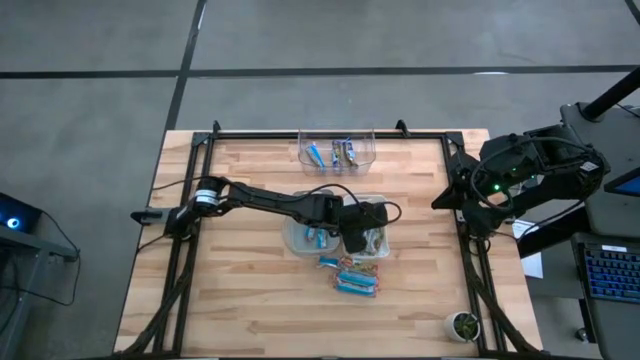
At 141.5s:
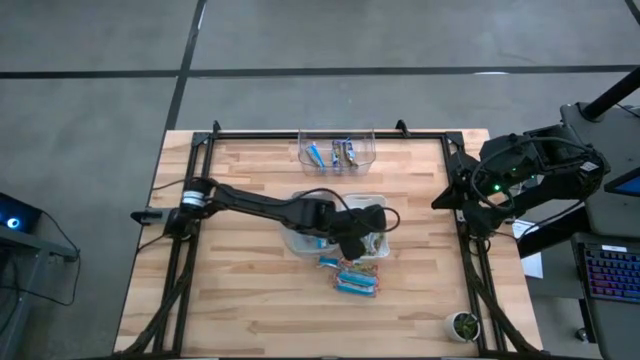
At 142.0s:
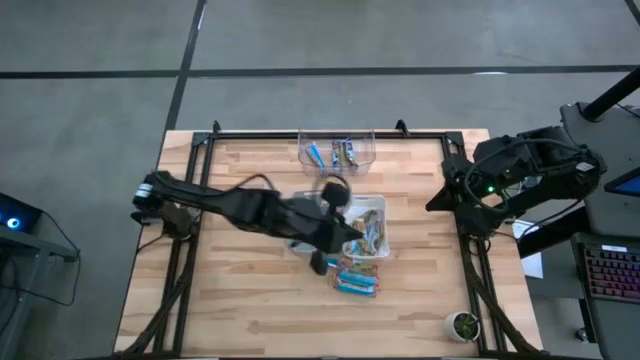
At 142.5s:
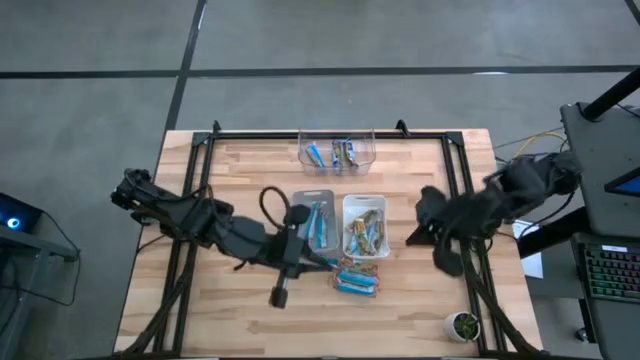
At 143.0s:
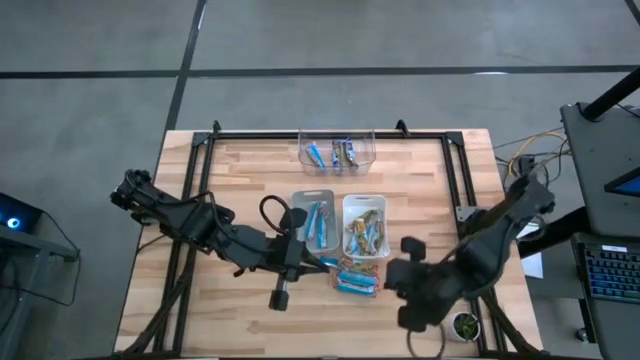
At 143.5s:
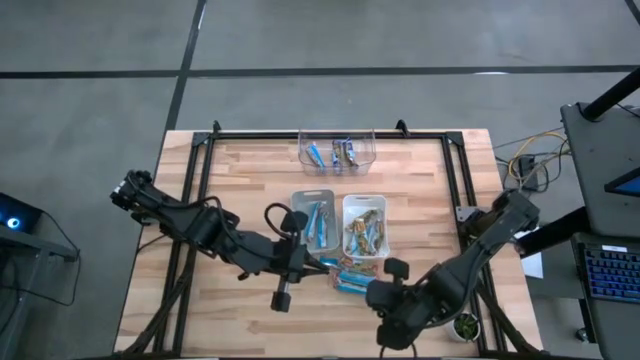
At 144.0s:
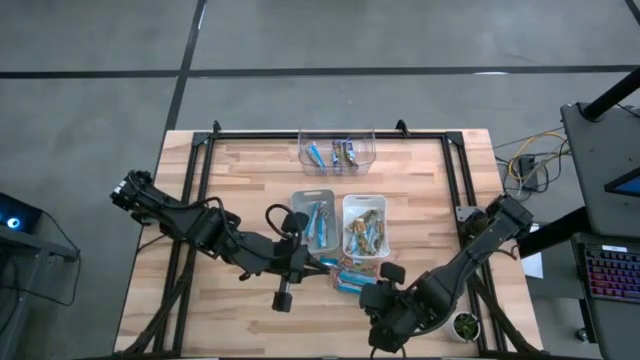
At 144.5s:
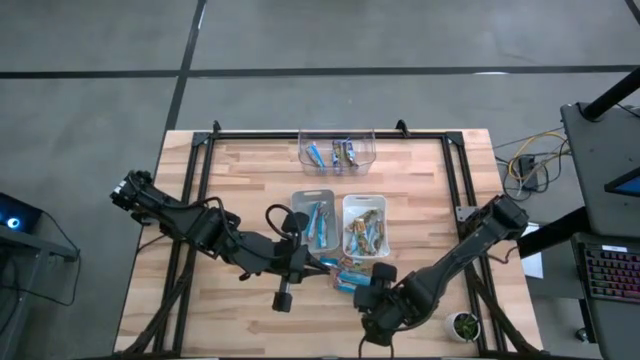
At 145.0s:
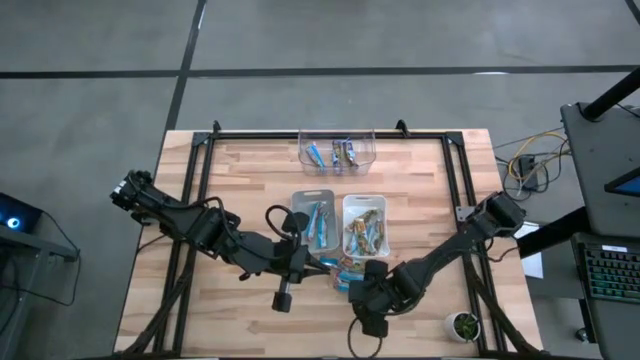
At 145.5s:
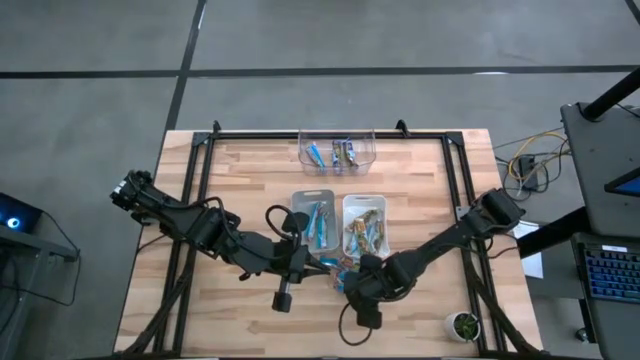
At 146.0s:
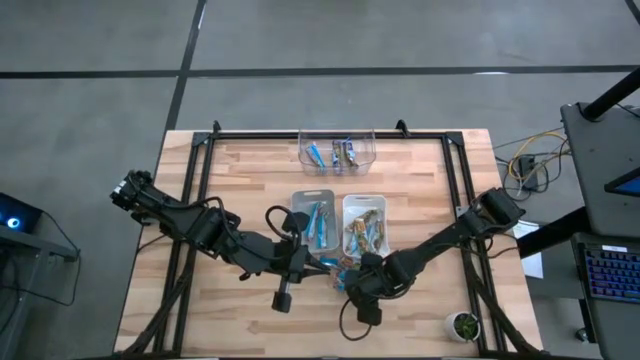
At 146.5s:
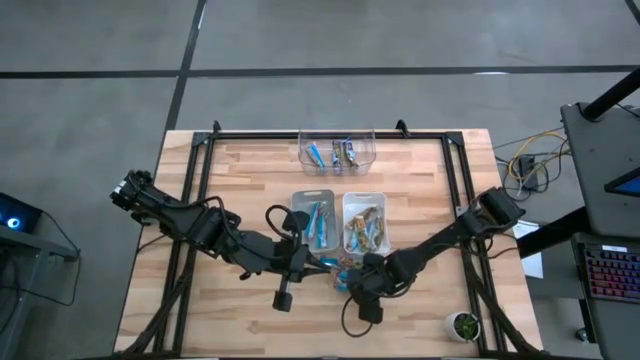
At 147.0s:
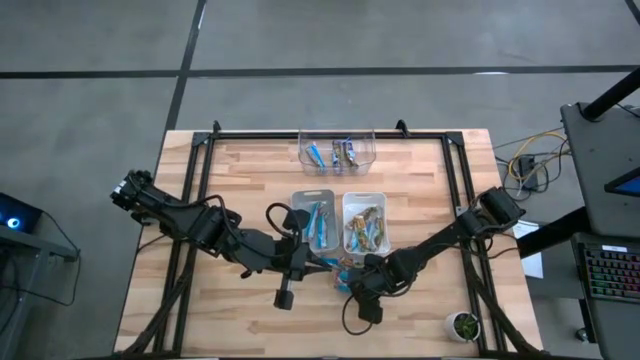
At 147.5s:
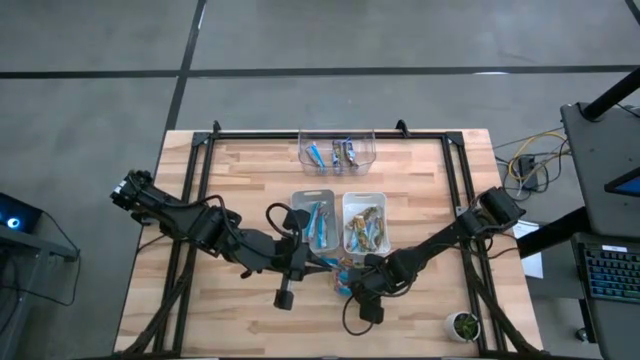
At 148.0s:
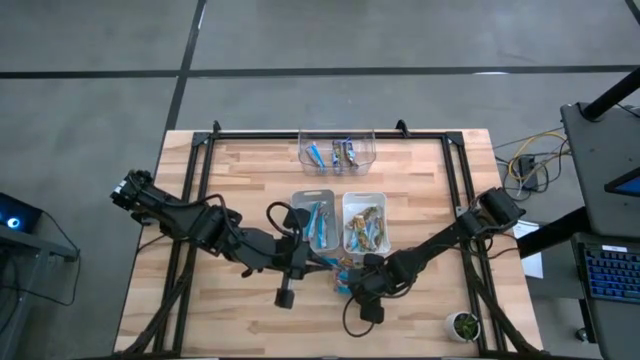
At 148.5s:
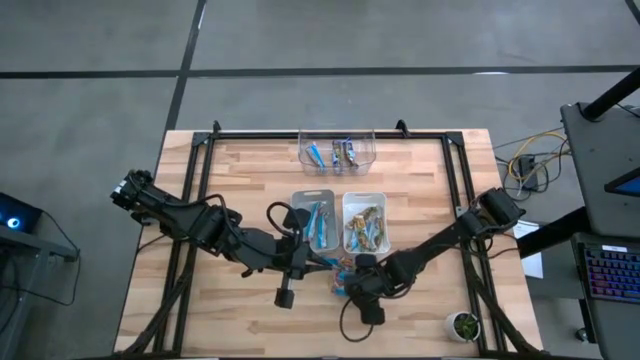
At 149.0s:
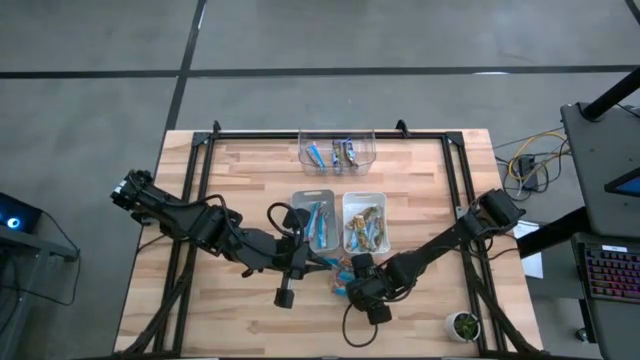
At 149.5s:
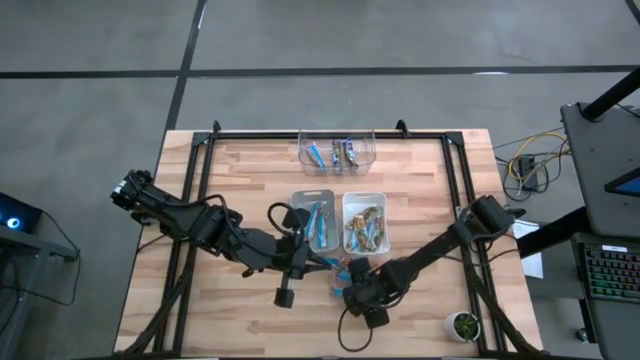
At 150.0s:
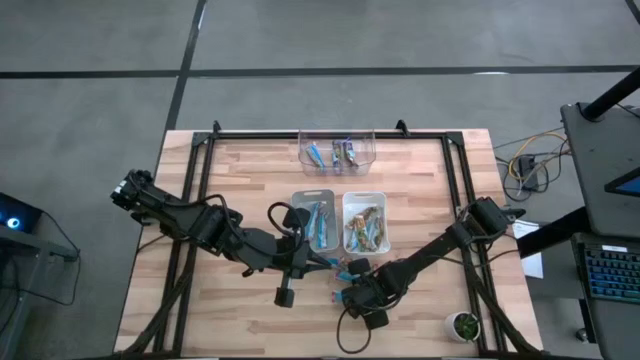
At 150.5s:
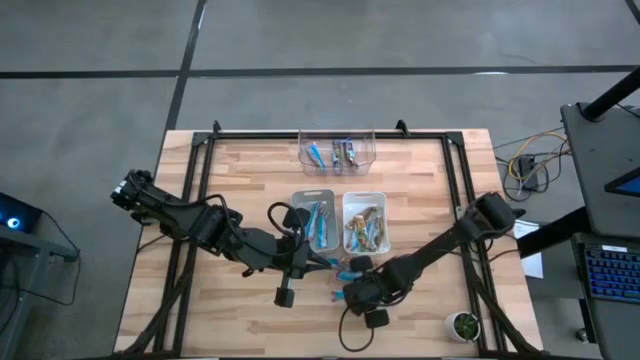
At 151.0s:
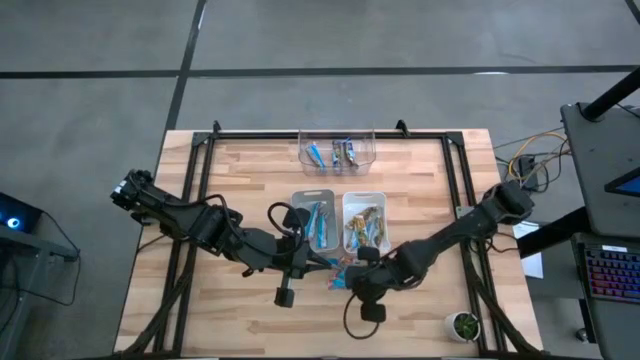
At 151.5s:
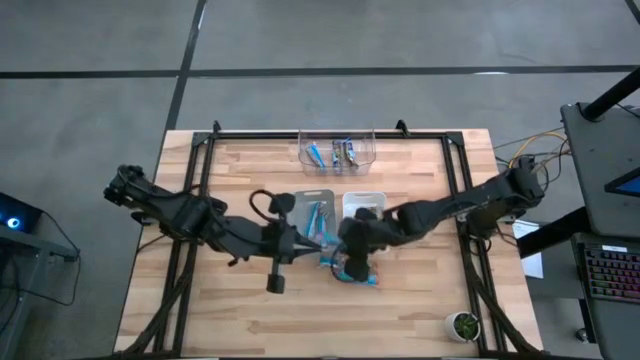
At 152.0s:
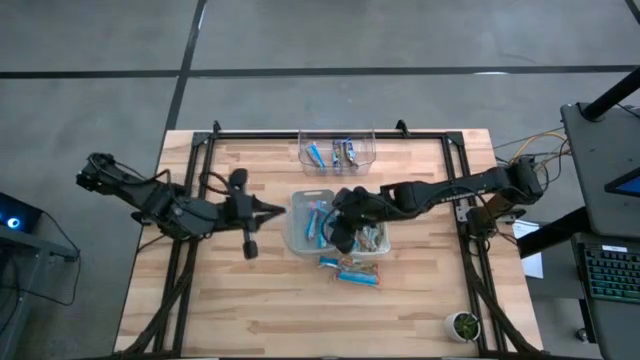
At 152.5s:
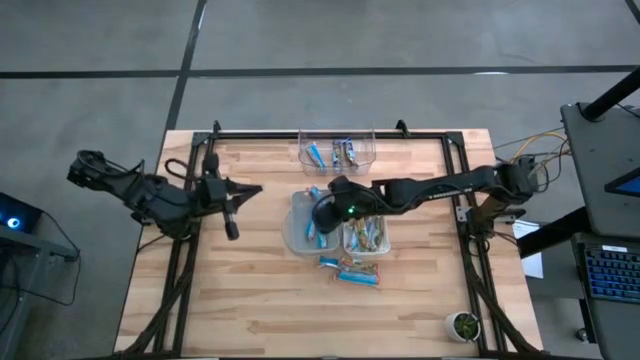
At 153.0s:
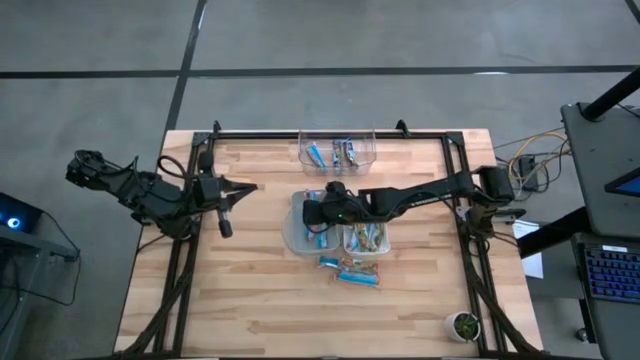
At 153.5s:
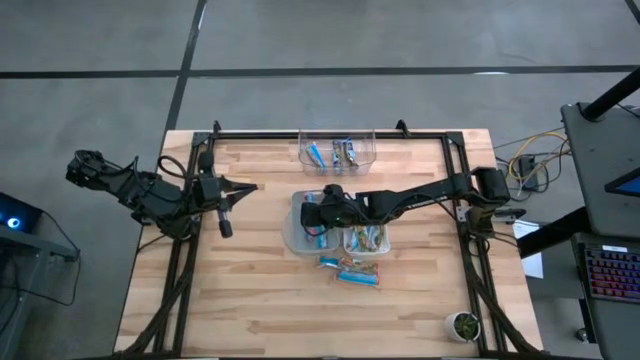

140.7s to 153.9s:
Task: Pick and place Granola Bars by type
Put the red granola bar into the gray bin

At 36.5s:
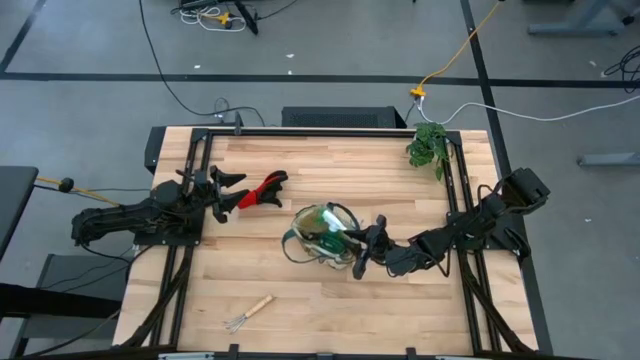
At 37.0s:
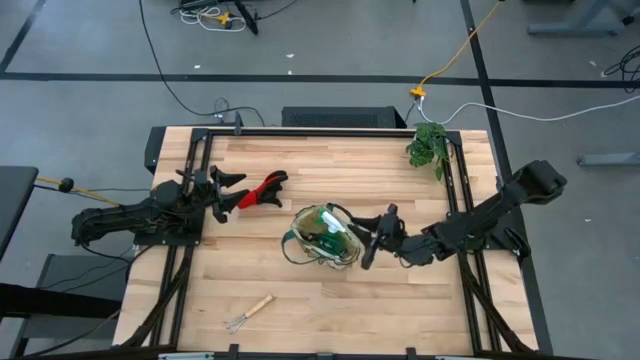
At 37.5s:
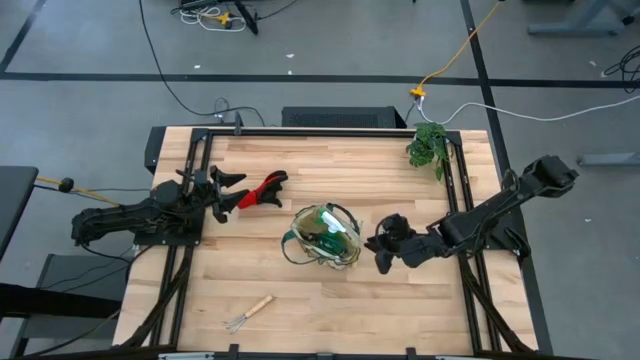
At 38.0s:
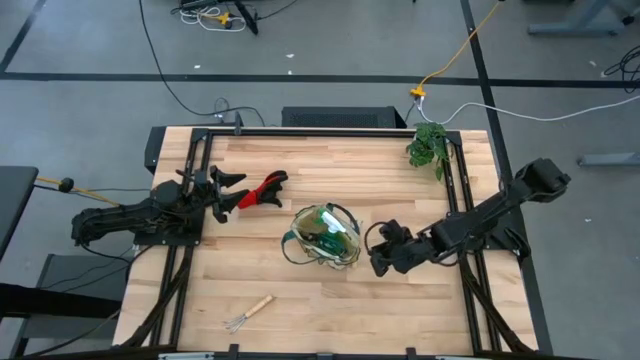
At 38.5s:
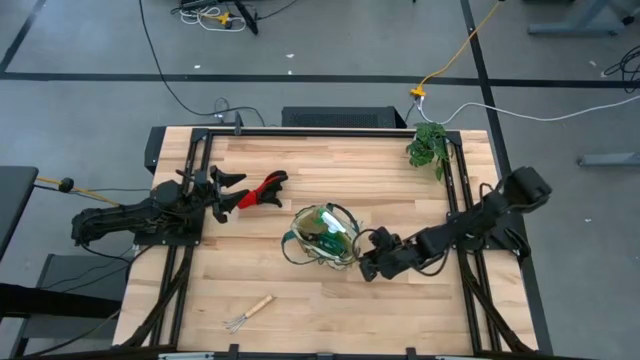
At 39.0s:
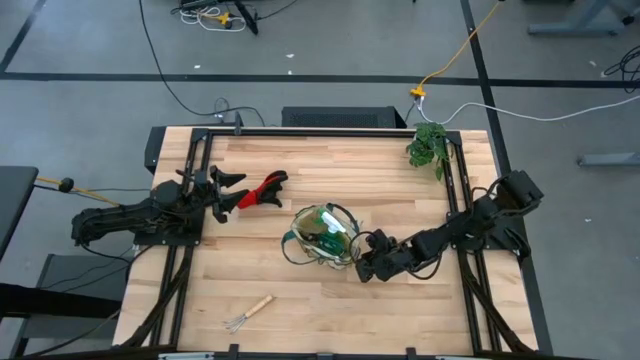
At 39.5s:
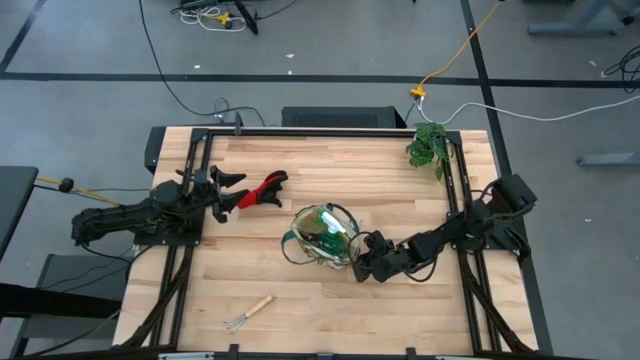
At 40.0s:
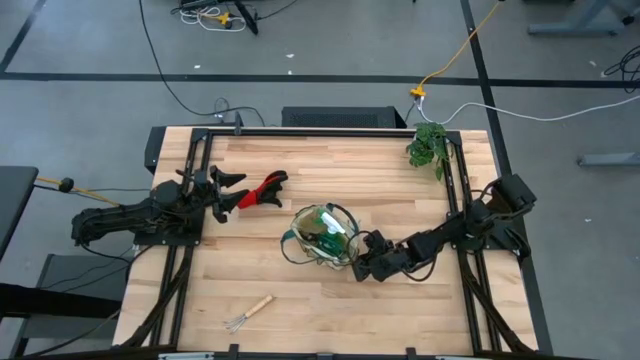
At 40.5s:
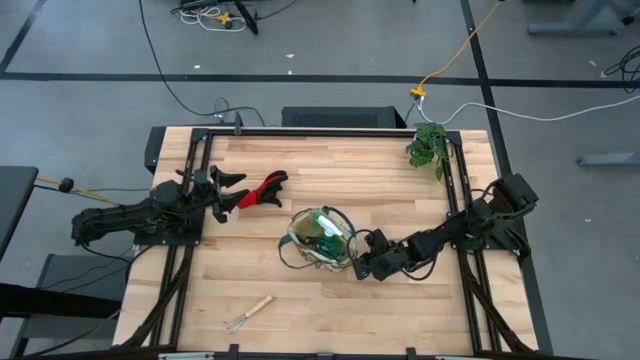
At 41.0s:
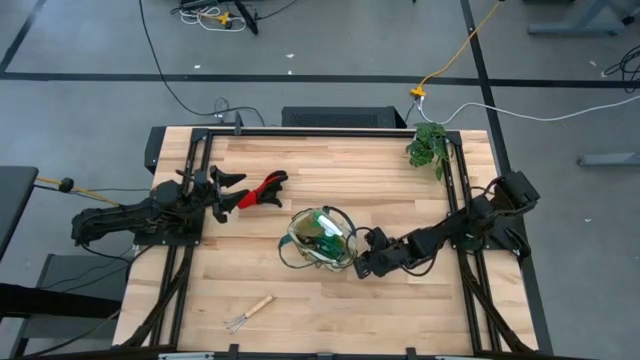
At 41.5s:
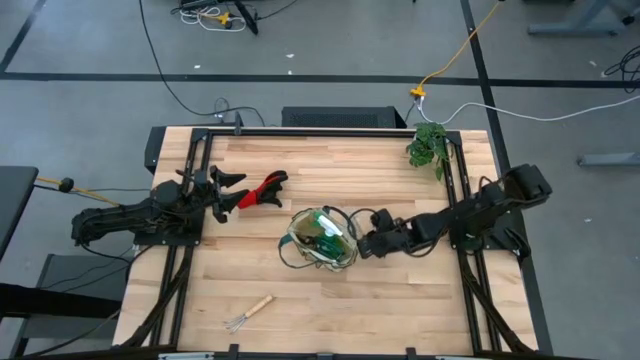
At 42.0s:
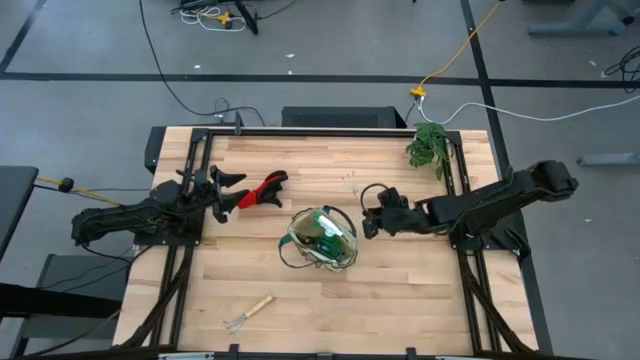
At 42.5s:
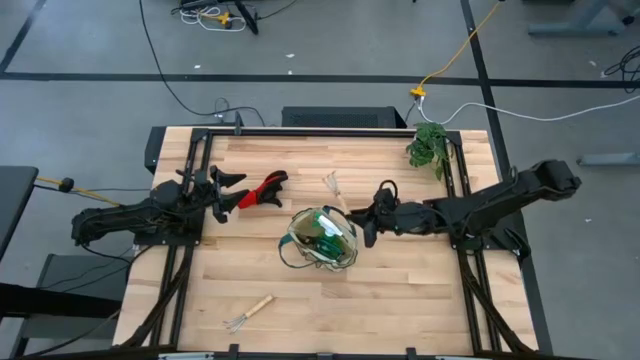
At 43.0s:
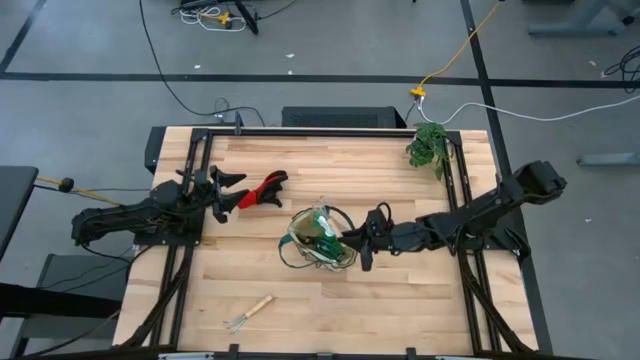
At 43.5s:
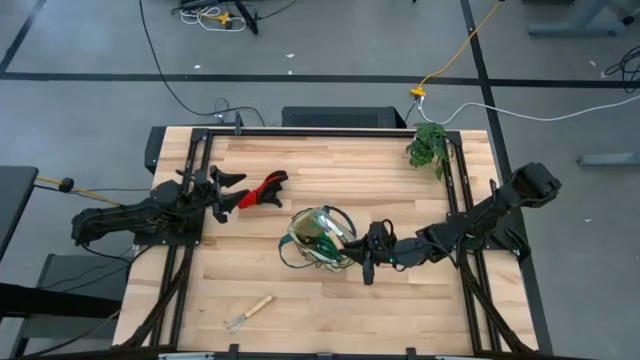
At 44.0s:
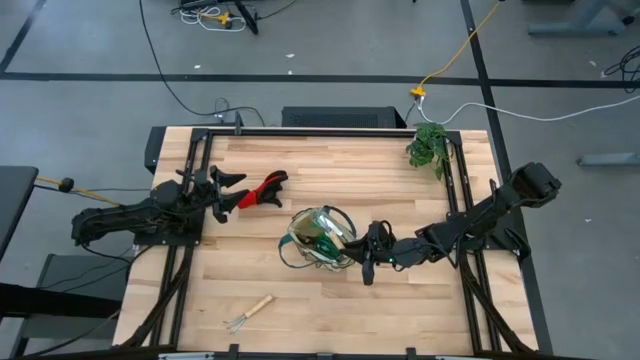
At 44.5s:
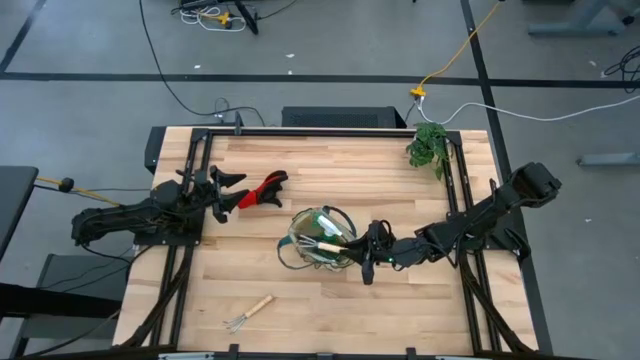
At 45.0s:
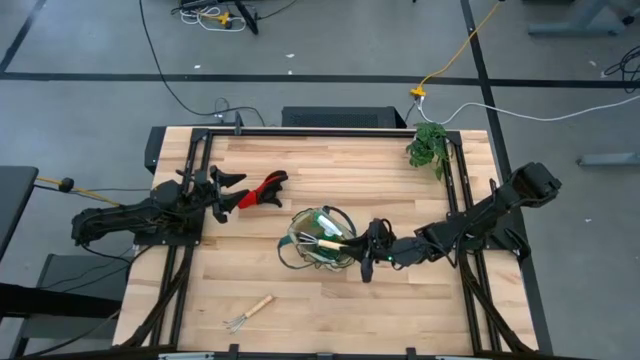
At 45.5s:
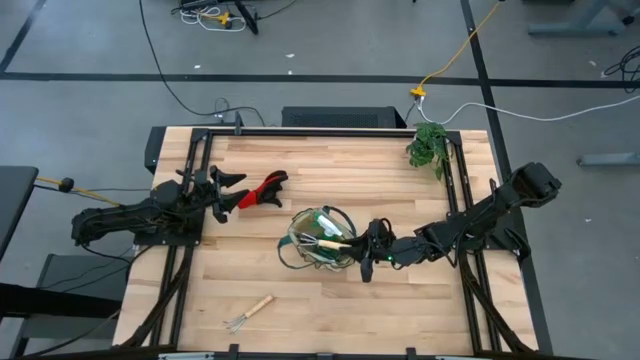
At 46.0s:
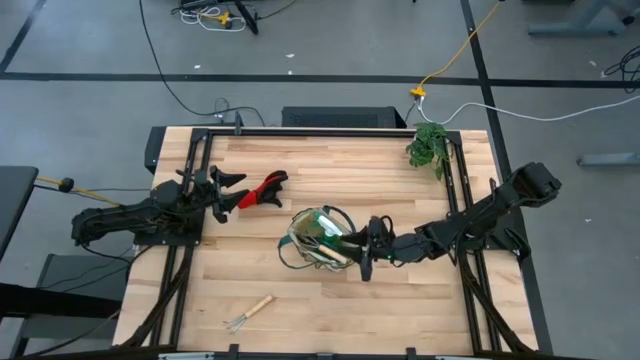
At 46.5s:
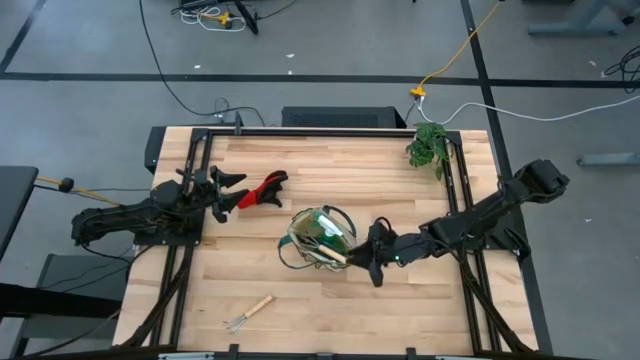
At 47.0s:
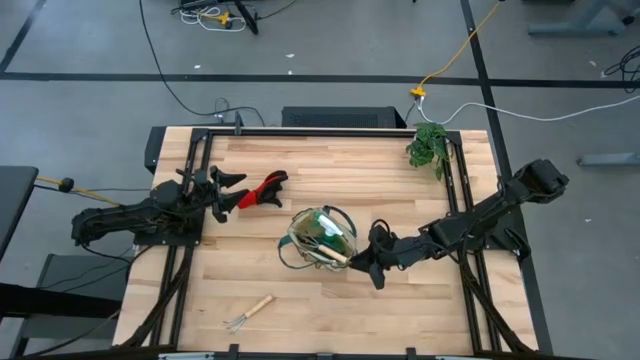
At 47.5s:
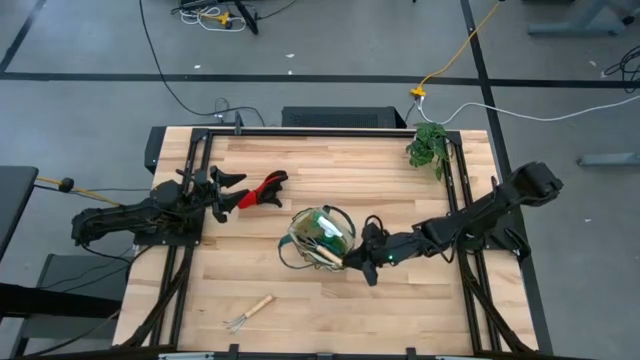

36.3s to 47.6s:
Task: Pick & Place Garden tools in Gardening bag
Put the light brown rake into the white bag
